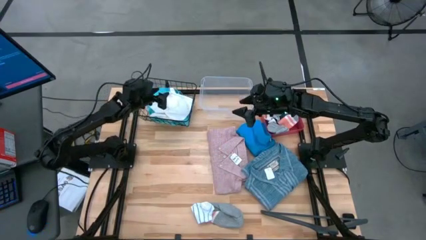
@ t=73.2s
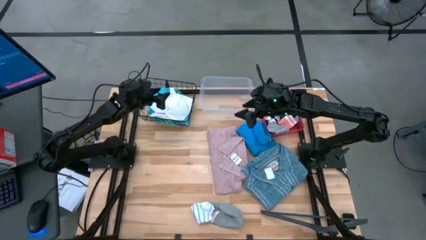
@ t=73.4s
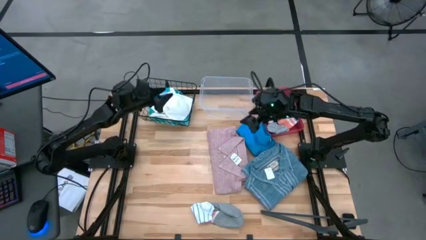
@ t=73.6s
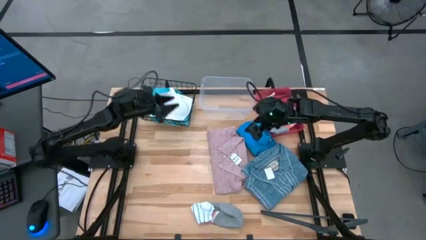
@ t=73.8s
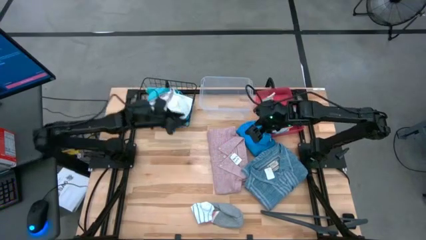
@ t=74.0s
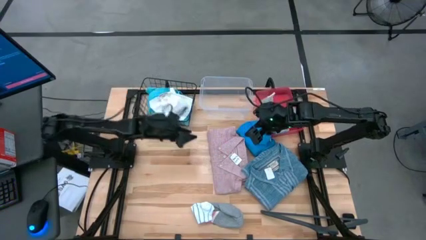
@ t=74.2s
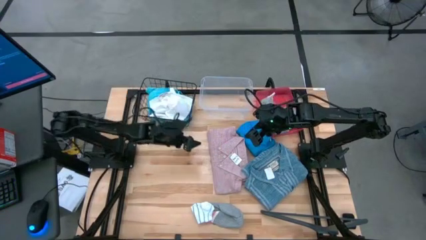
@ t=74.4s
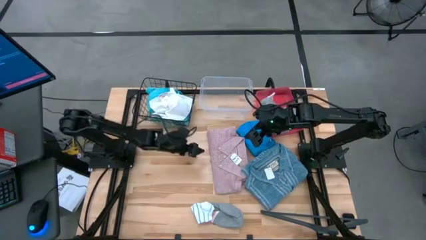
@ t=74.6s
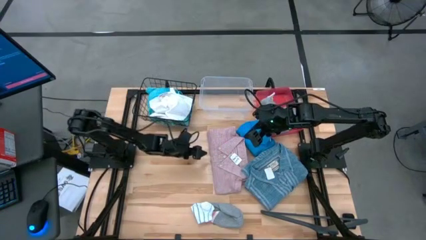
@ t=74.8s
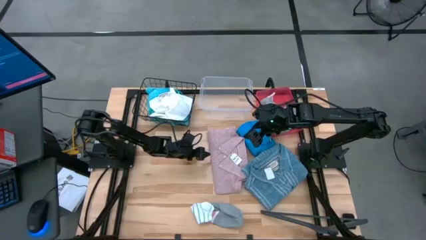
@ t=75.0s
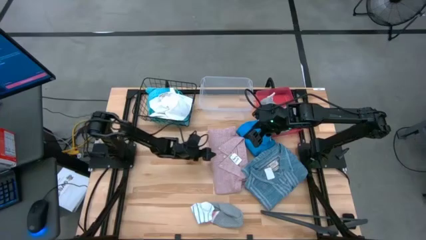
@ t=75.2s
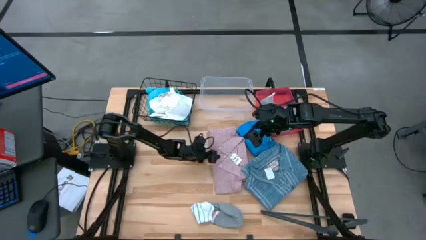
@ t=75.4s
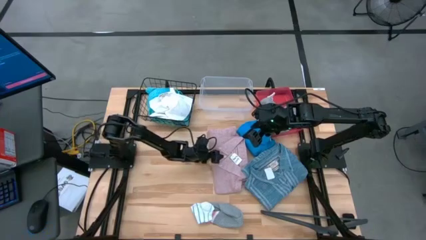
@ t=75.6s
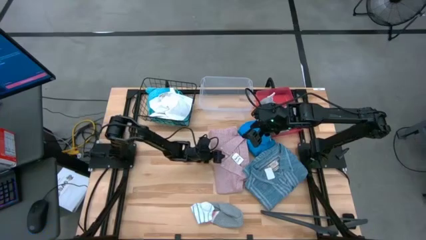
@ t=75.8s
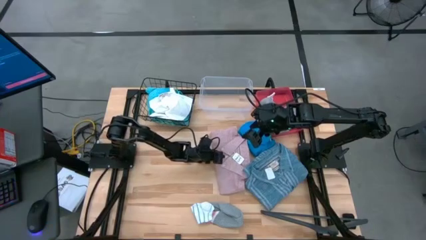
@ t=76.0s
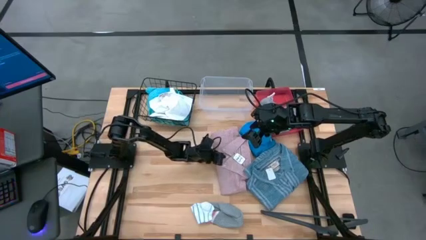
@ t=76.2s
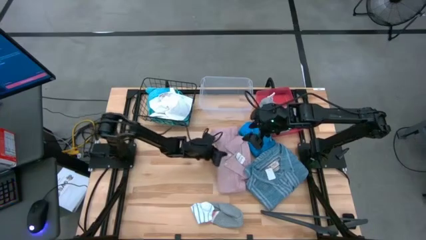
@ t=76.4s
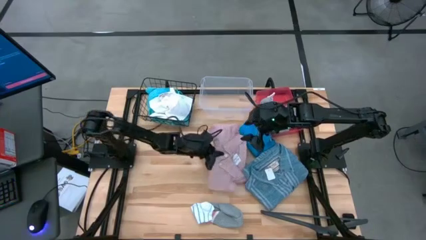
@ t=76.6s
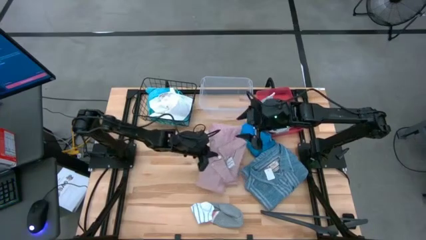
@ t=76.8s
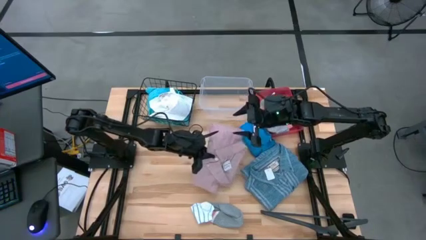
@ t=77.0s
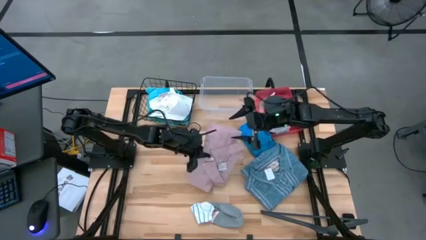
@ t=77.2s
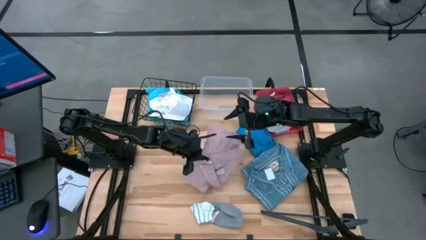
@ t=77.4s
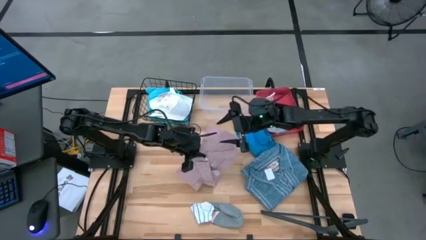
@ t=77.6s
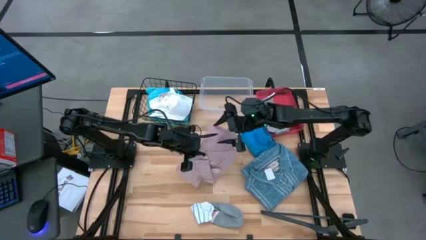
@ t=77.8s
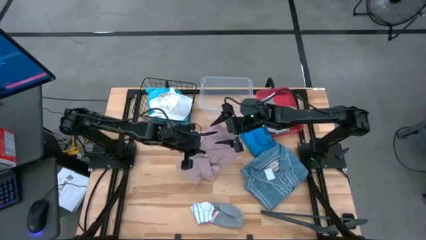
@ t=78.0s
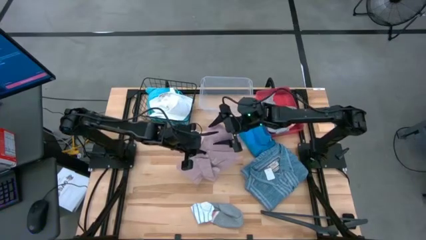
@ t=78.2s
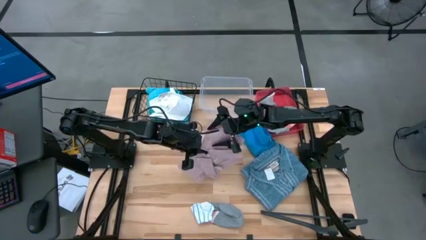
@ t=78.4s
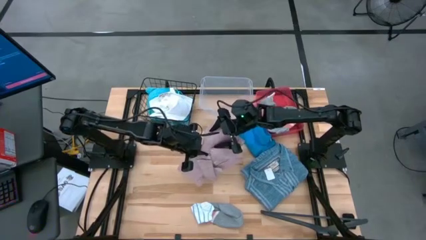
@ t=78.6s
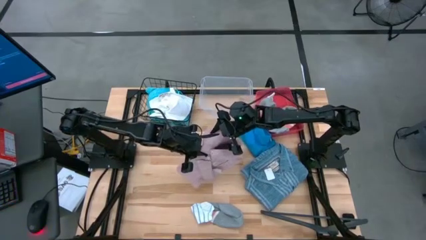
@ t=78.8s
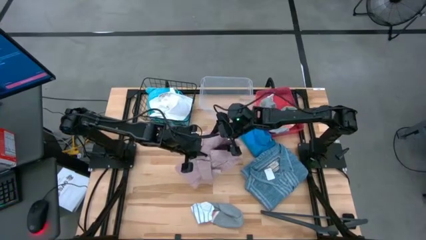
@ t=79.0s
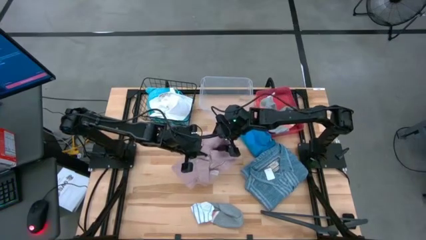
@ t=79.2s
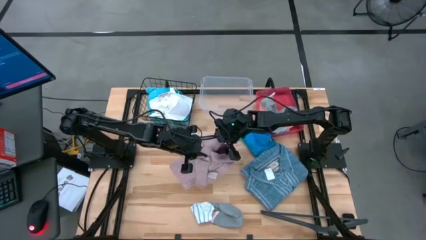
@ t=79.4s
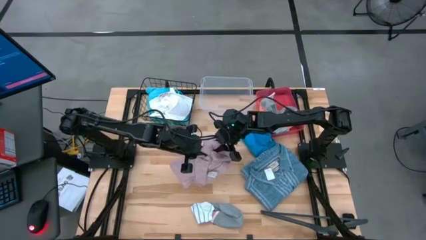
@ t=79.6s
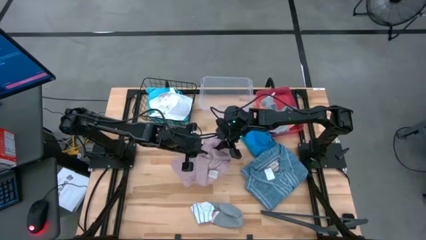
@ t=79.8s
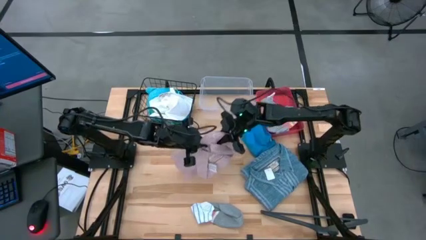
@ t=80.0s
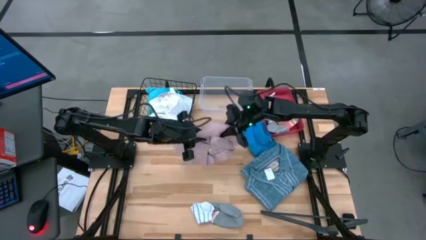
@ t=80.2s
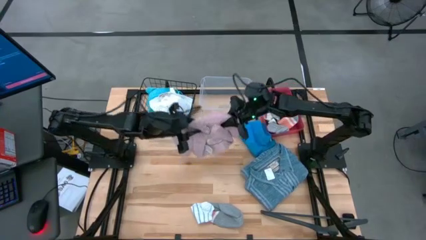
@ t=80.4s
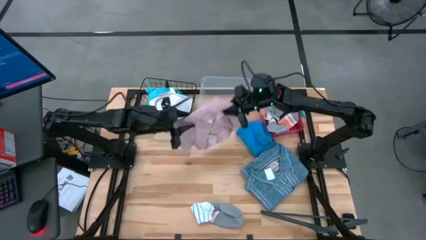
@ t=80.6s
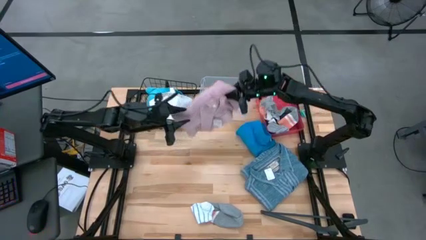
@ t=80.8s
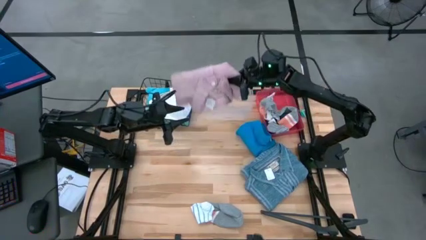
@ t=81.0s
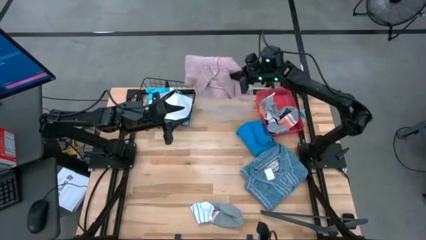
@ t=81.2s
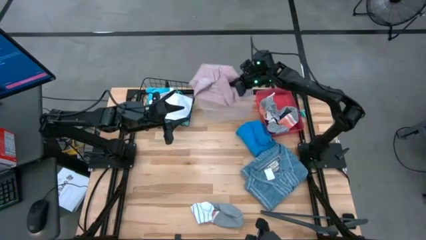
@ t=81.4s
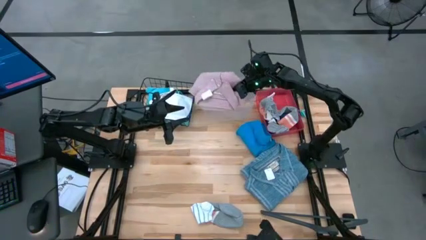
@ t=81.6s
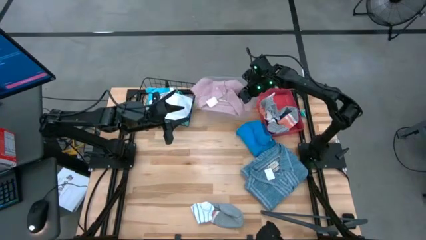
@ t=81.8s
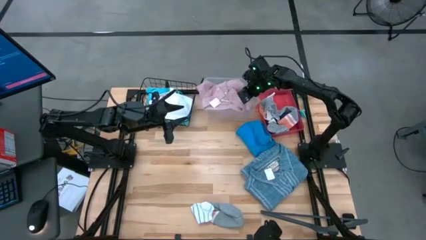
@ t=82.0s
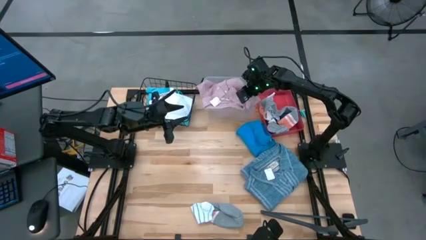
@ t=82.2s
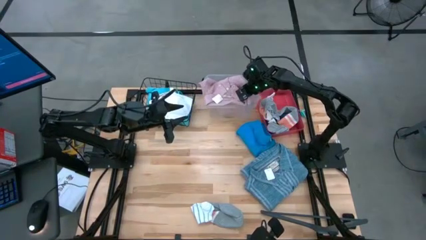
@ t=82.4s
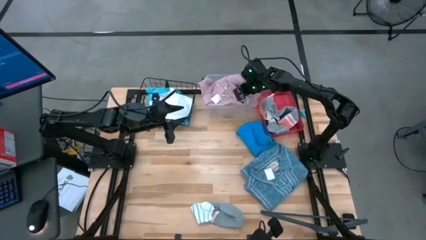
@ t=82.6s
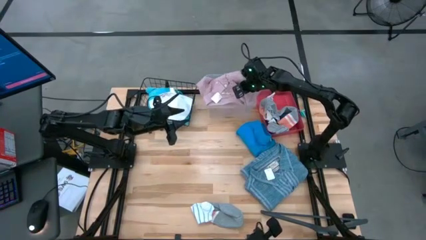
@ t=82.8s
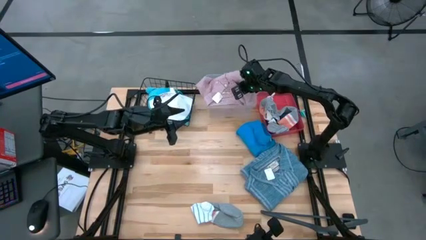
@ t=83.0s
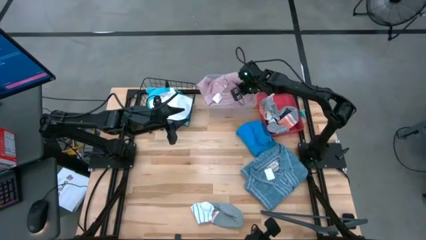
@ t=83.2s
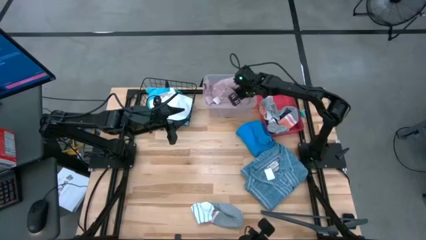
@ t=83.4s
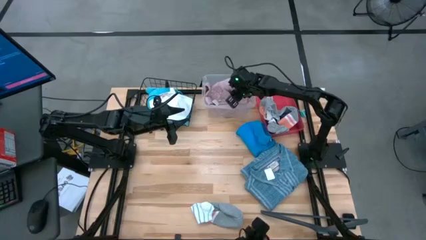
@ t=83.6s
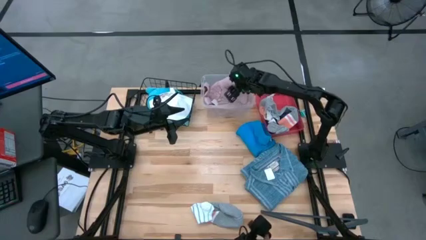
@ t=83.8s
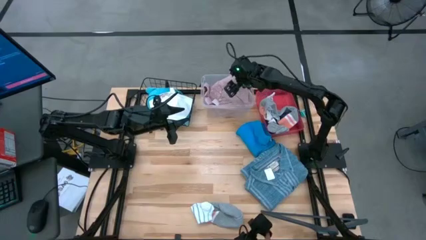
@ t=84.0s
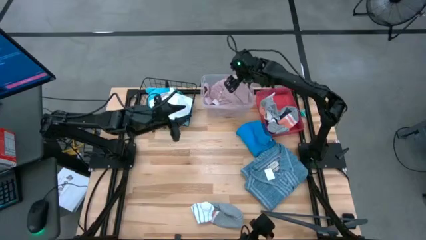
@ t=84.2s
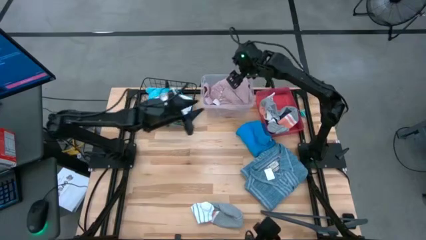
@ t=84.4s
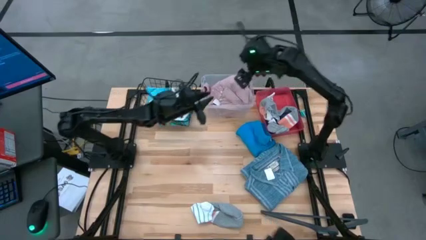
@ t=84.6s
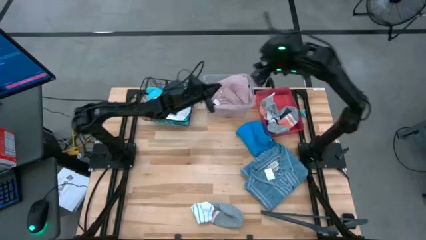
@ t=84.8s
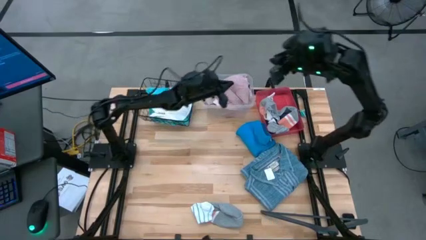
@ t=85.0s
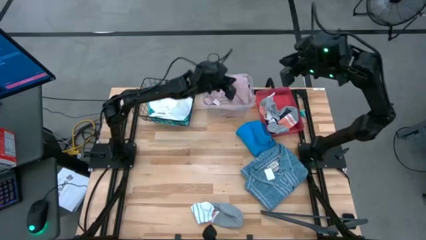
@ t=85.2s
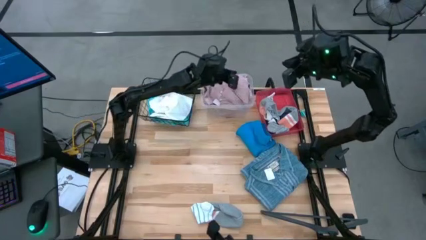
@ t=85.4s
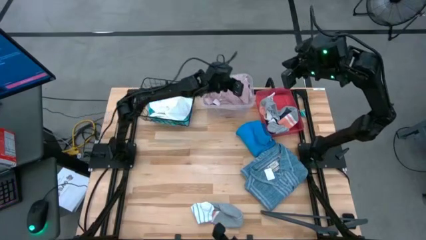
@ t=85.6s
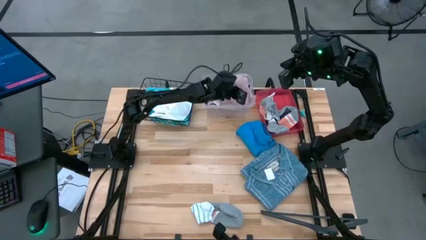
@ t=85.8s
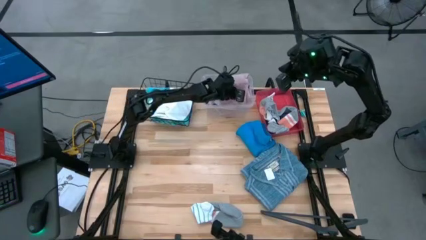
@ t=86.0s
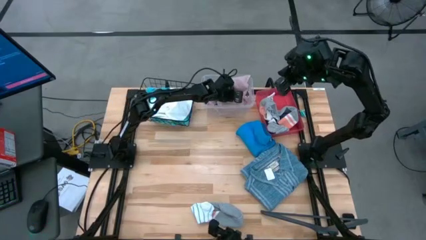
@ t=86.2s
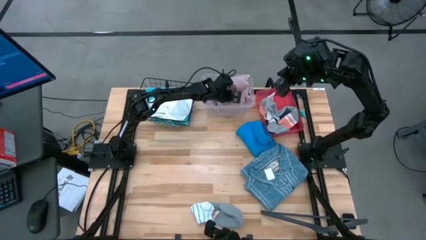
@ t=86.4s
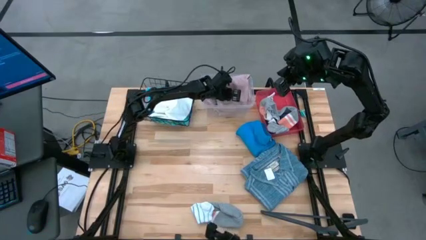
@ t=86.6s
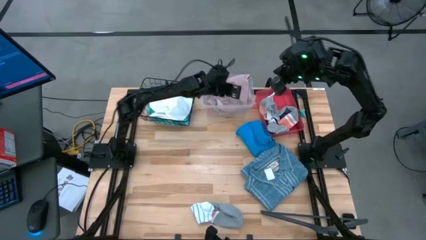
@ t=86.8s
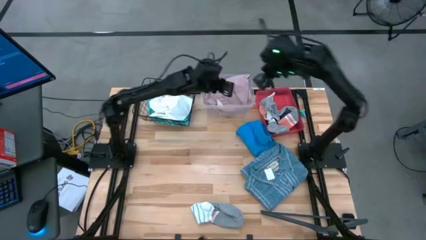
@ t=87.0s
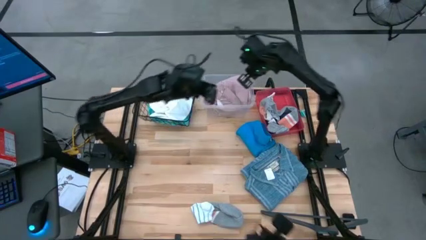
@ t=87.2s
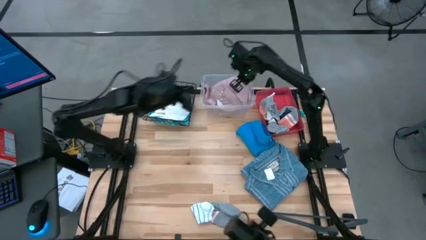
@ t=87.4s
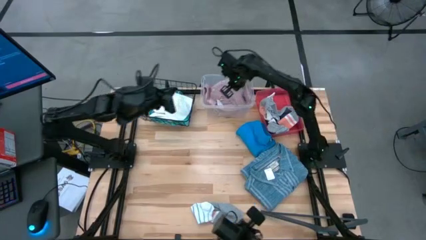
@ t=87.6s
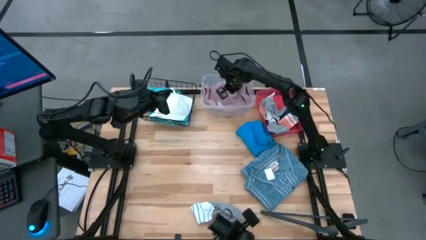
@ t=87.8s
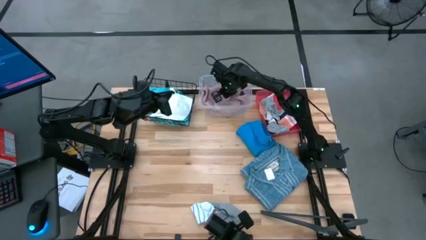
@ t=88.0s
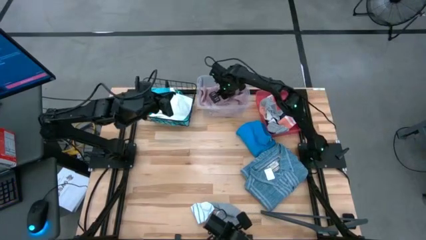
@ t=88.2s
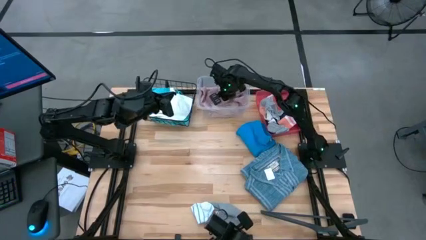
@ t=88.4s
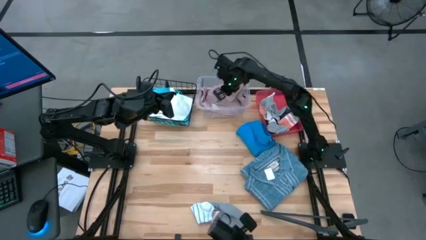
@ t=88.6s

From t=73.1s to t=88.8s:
Task: Pick & Place Cloths
Put the pink polo shirt into the transparent bin
